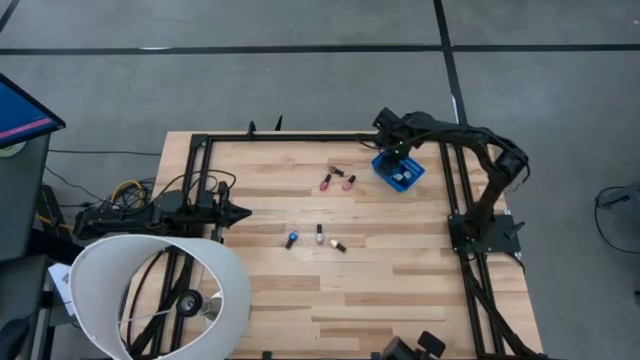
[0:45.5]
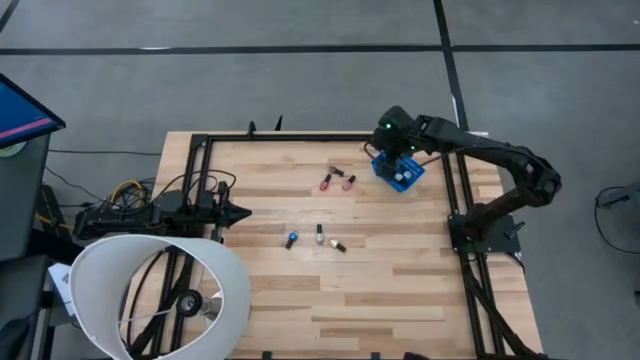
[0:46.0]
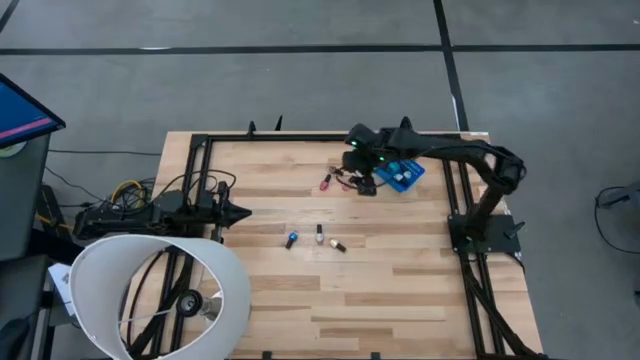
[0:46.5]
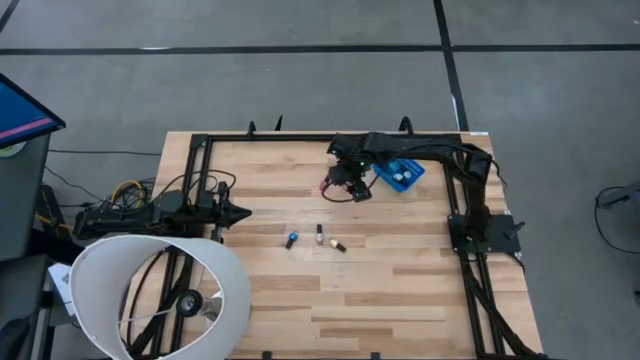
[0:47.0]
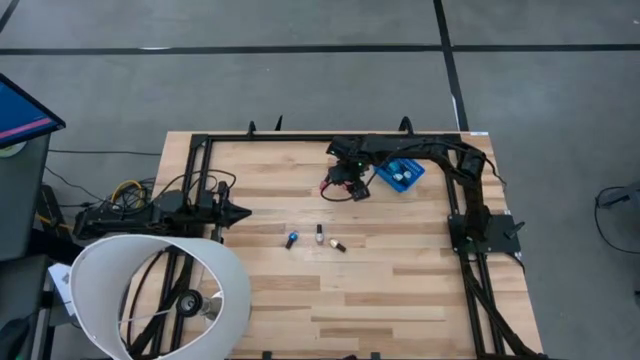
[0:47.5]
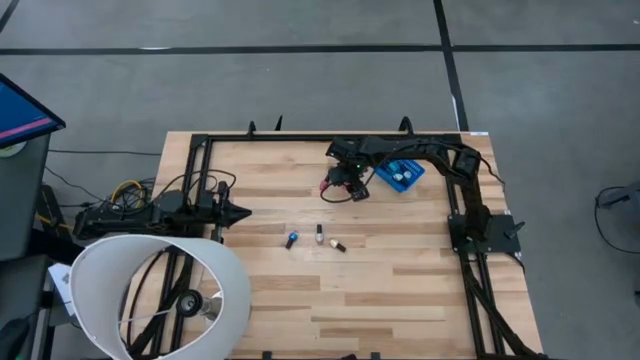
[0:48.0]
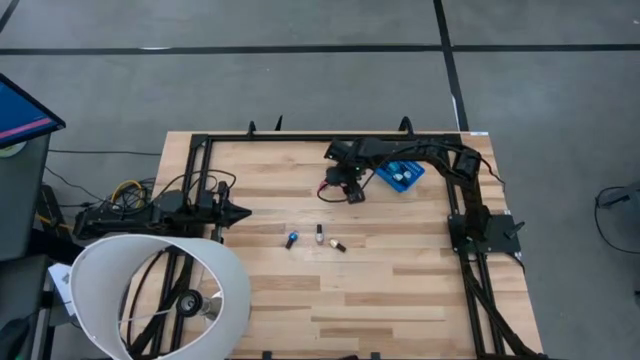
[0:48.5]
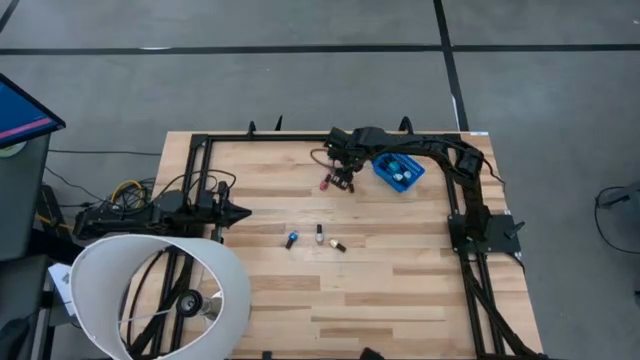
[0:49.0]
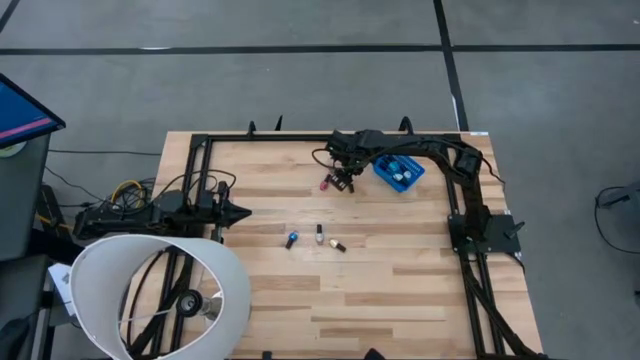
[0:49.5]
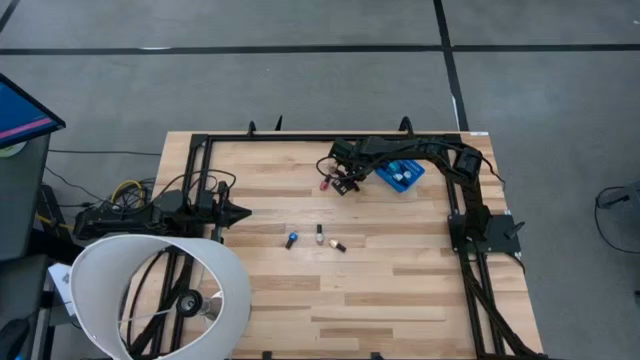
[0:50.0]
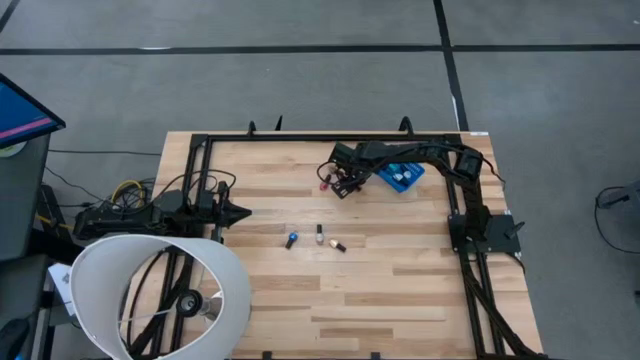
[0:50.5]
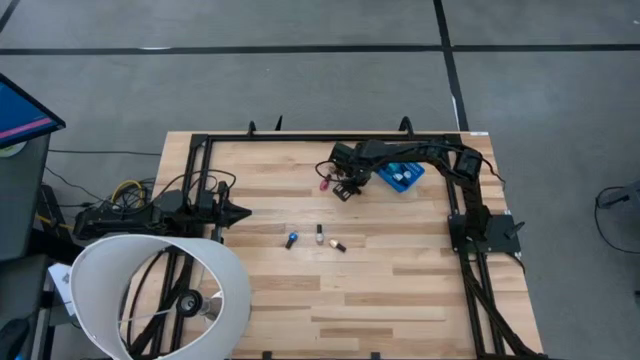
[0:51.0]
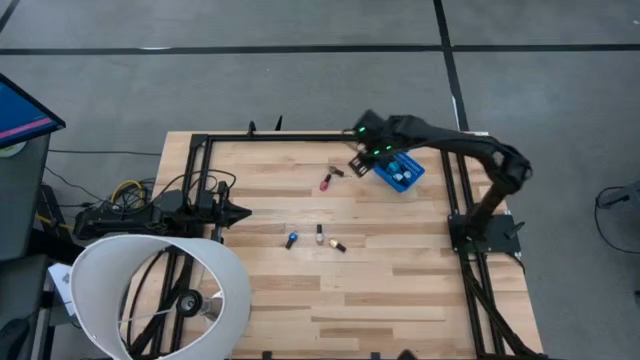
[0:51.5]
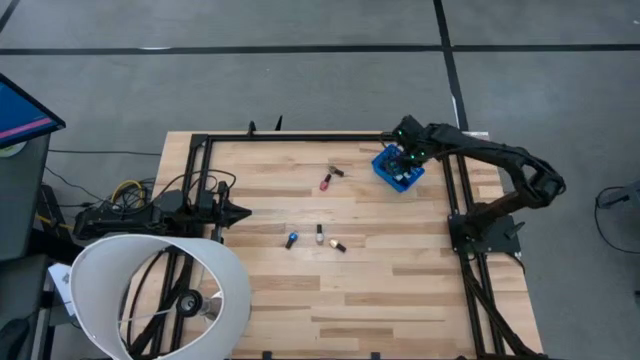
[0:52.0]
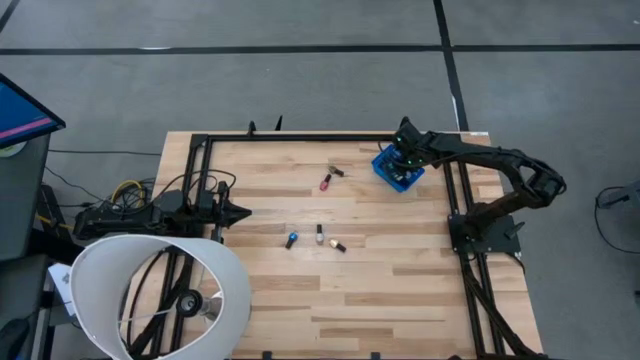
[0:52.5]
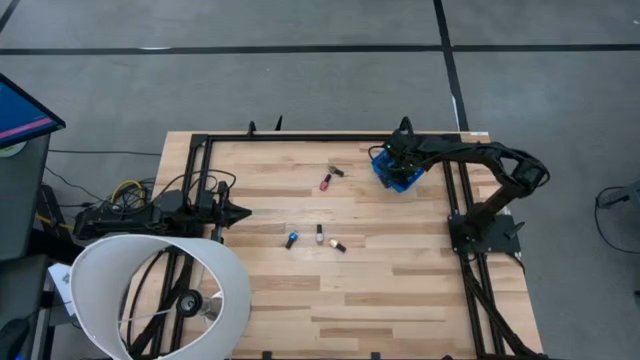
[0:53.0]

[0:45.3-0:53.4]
Task: Pick & Place Nail Polish
Put the pink nail polish bottle into the blue bin

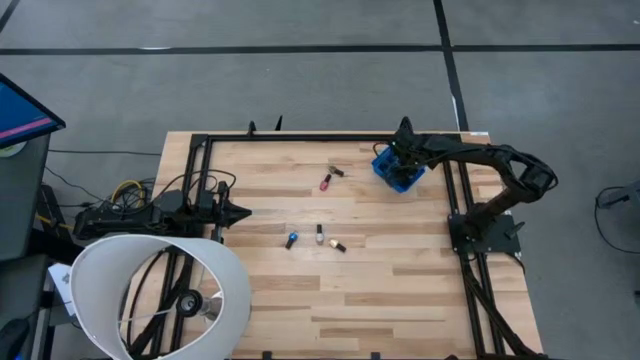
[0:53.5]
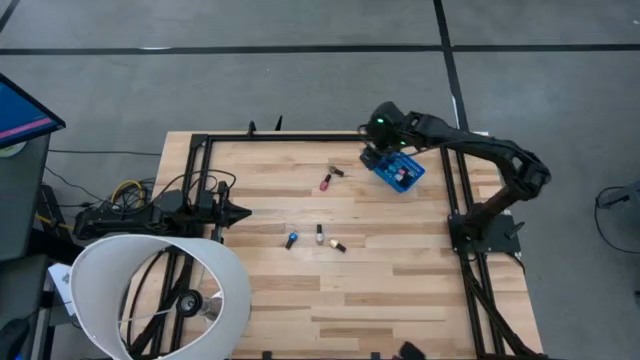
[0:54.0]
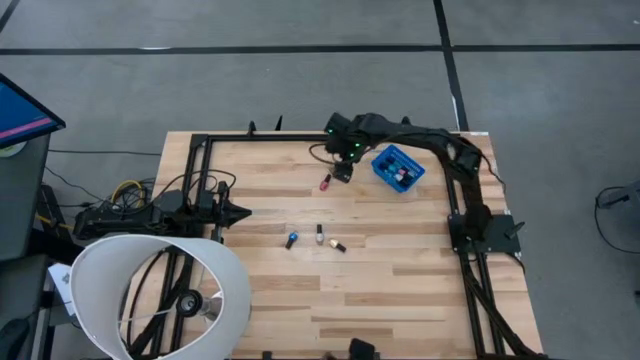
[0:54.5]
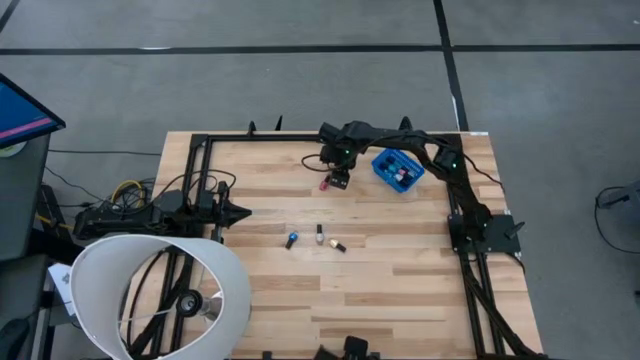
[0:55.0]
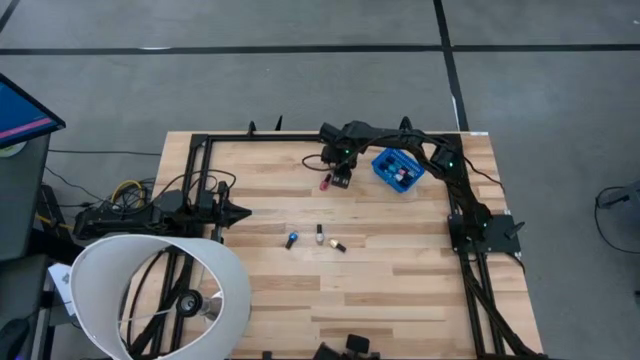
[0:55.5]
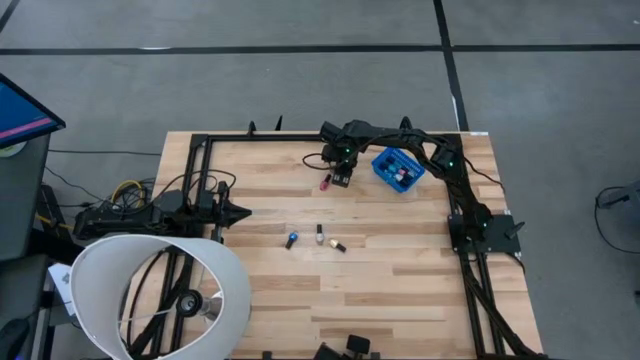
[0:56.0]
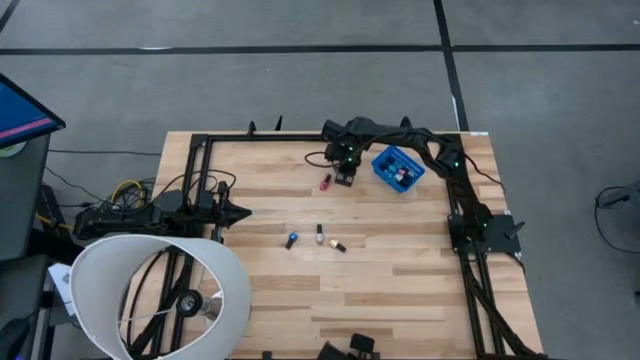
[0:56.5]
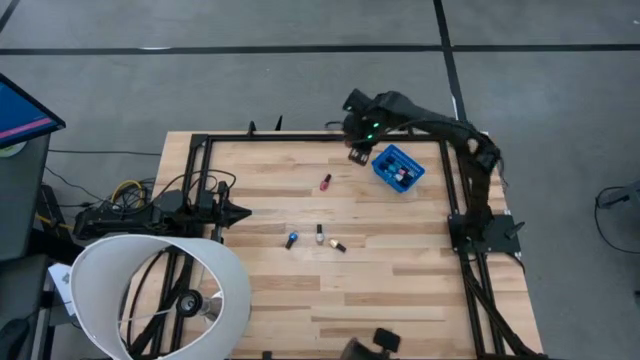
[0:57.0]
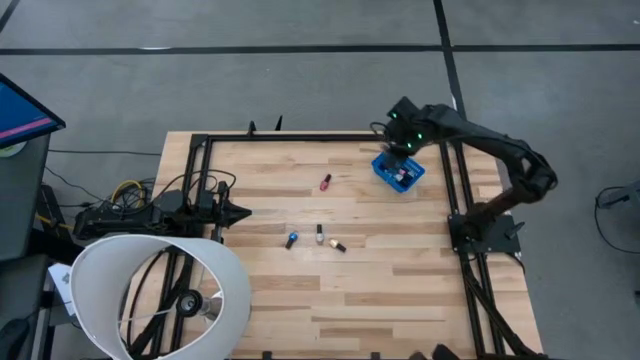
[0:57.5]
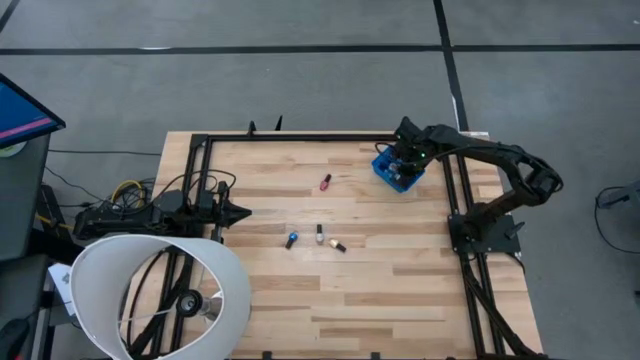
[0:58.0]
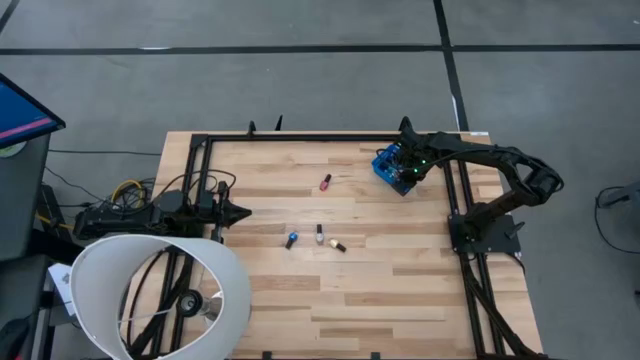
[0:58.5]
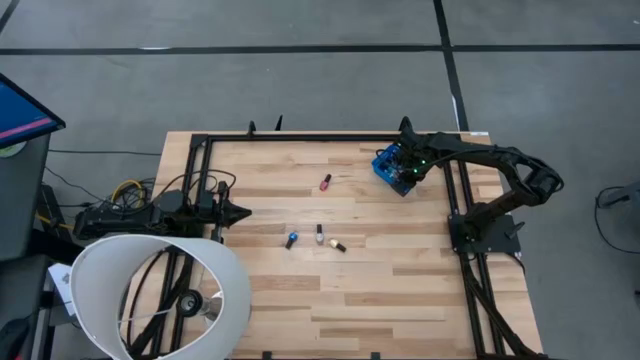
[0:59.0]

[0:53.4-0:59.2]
Put the brown nail polish bottle into the blue bin

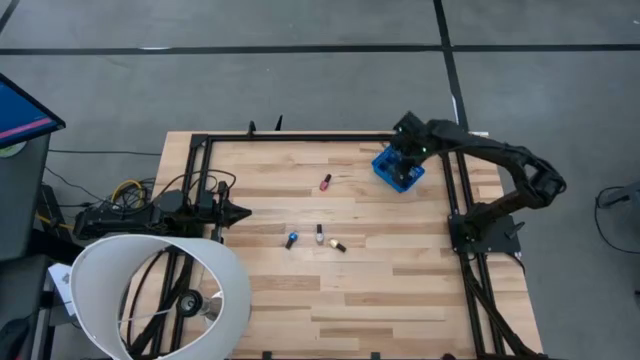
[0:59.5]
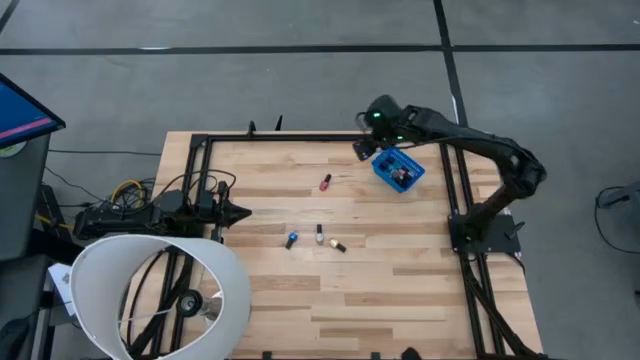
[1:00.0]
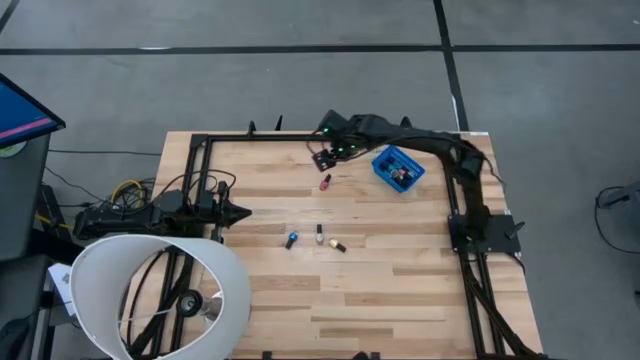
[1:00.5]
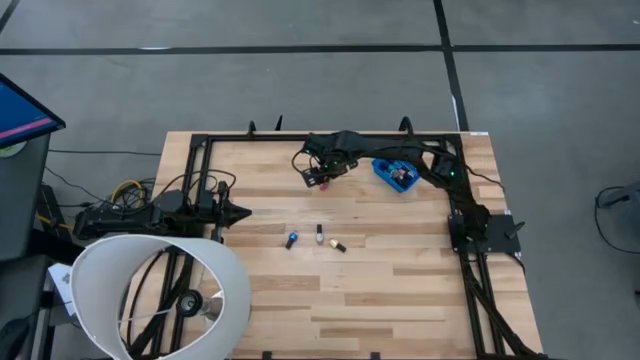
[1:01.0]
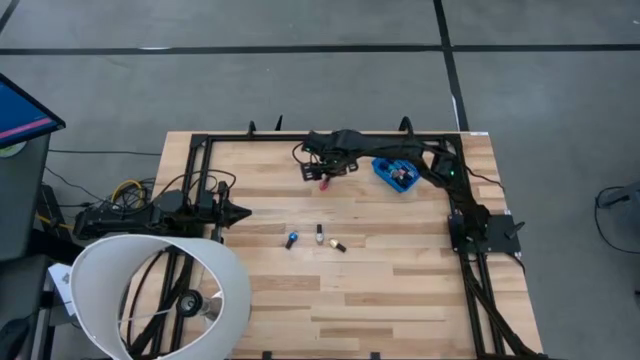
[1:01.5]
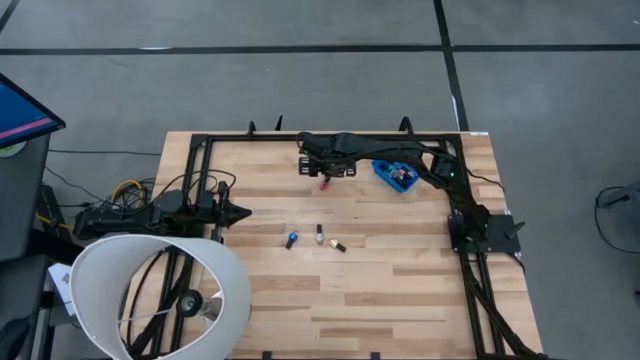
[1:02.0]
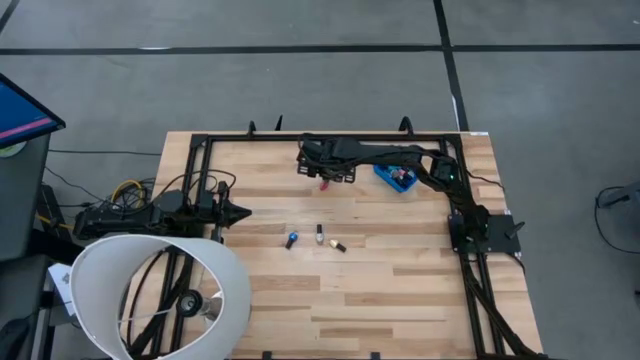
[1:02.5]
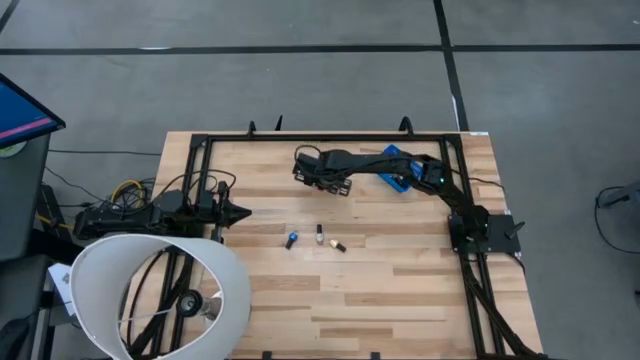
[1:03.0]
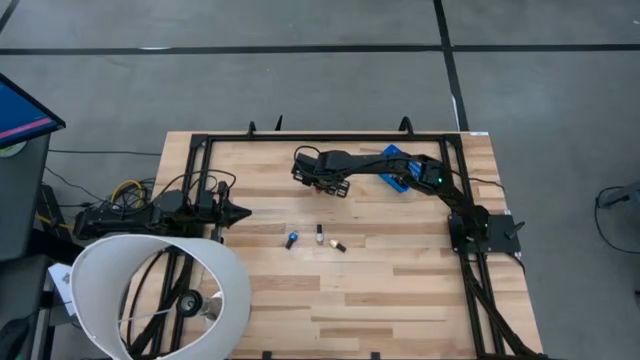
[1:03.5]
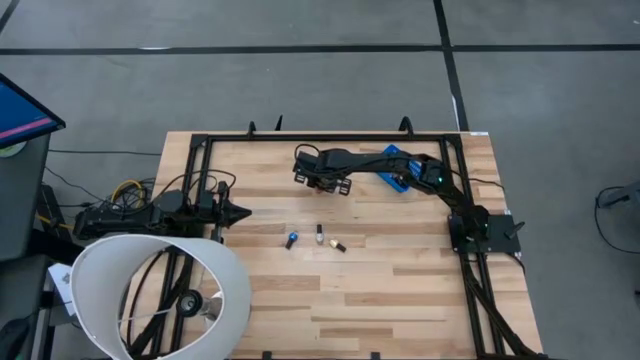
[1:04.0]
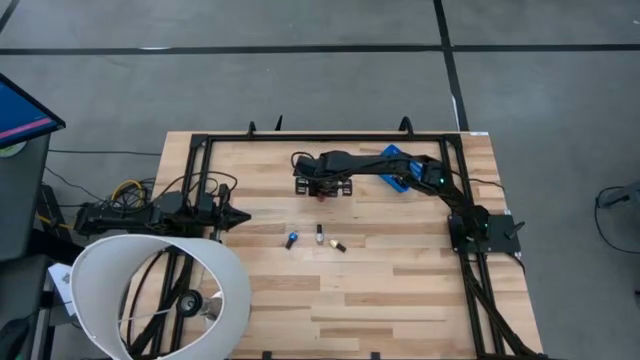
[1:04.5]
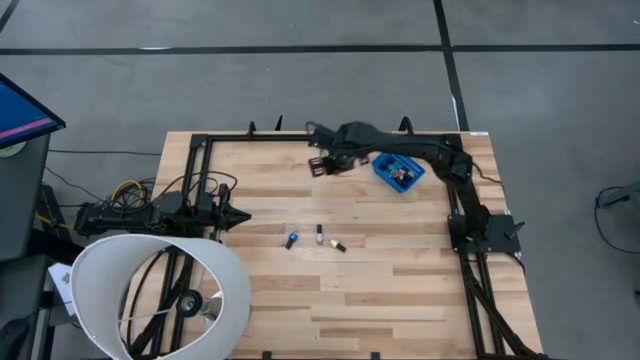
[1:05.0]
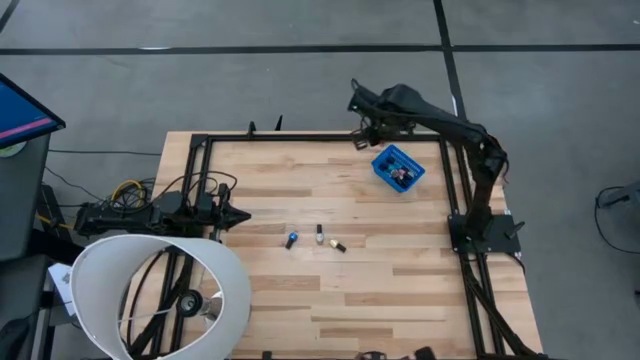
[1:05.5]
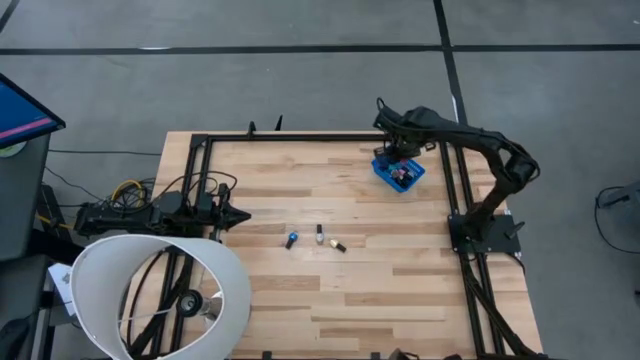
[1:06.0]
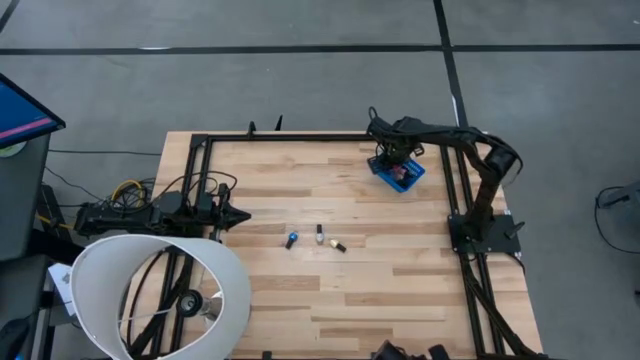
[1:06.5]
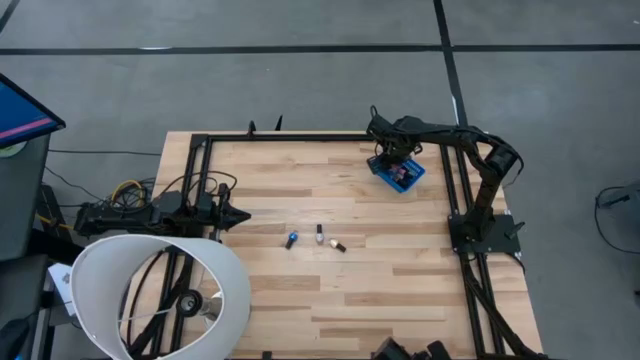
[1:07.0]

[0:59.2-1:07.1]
Put the red nail polish bottle into the blue bin
